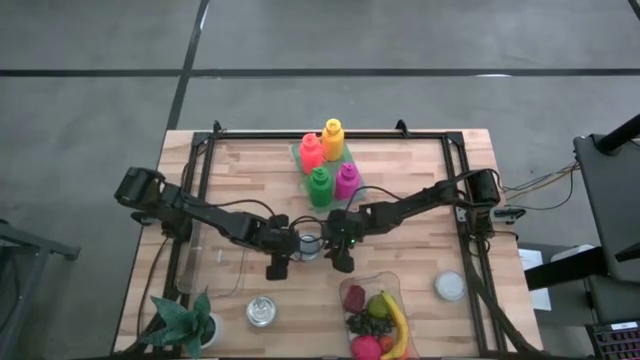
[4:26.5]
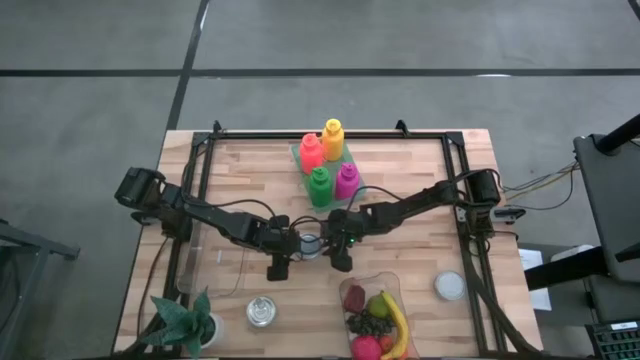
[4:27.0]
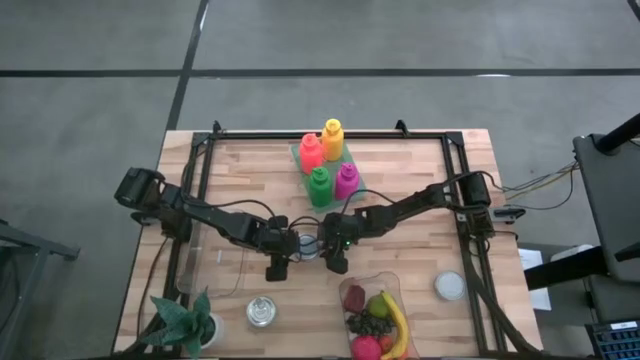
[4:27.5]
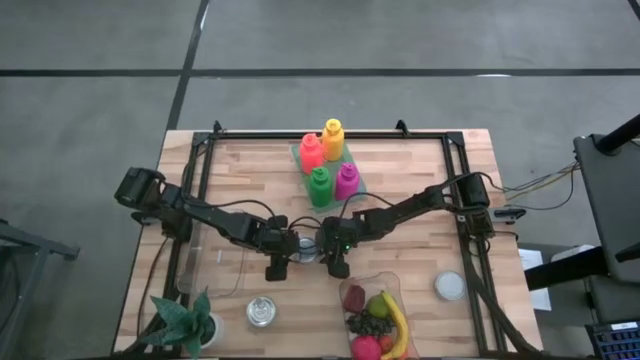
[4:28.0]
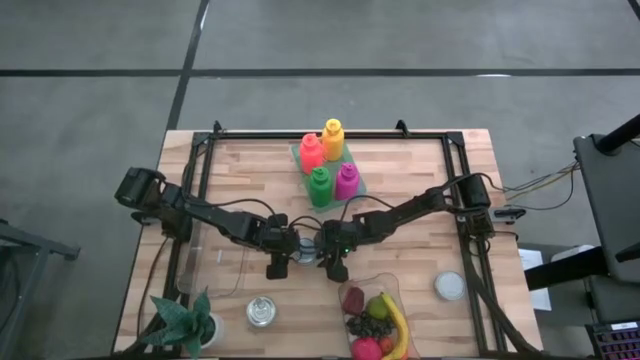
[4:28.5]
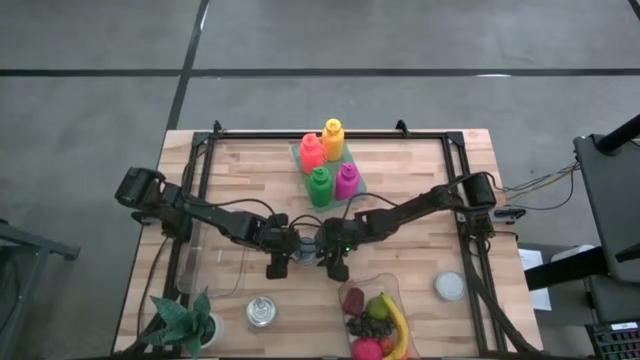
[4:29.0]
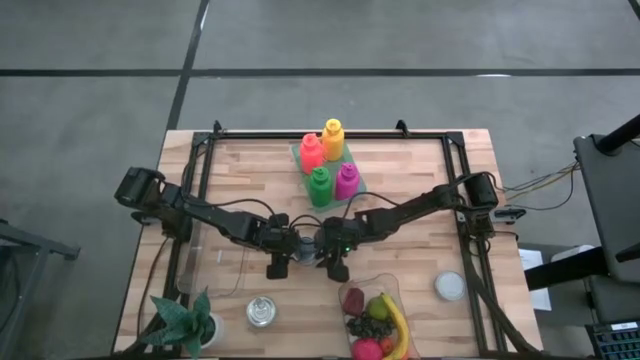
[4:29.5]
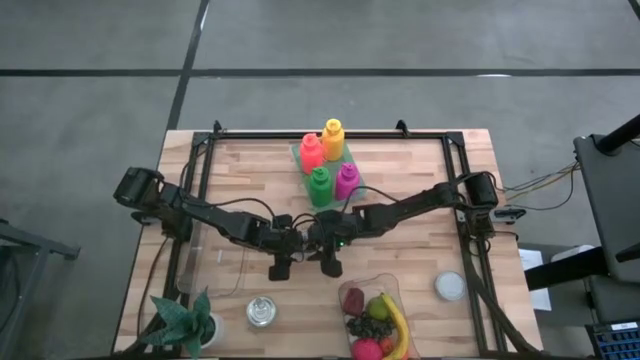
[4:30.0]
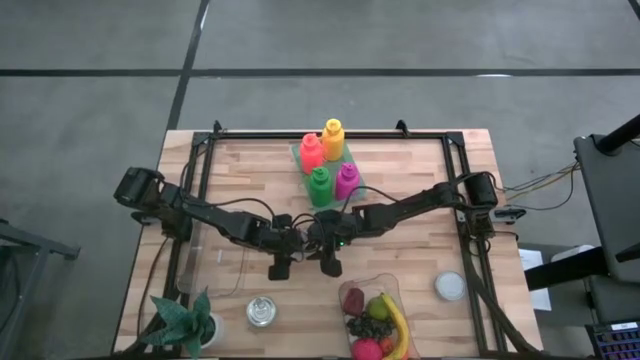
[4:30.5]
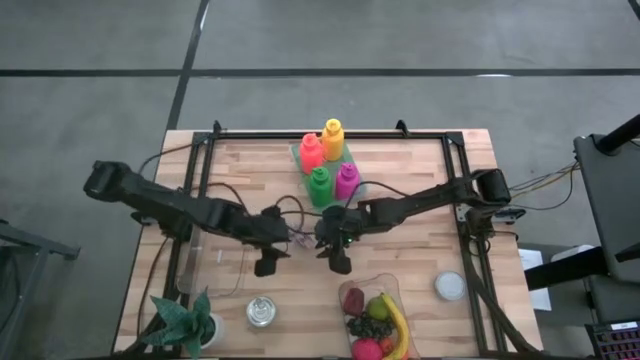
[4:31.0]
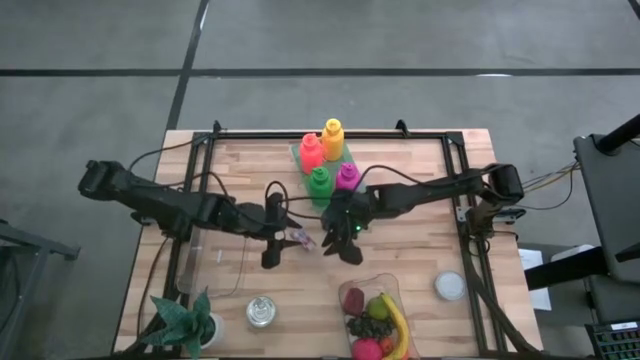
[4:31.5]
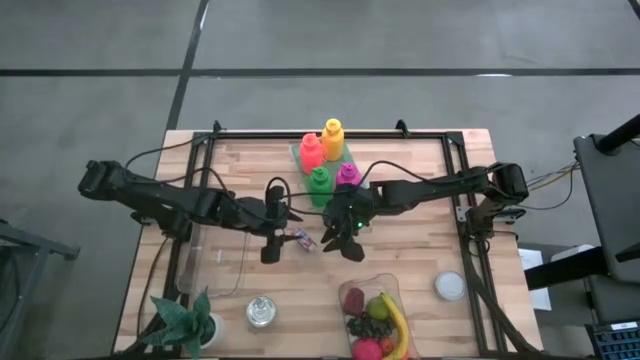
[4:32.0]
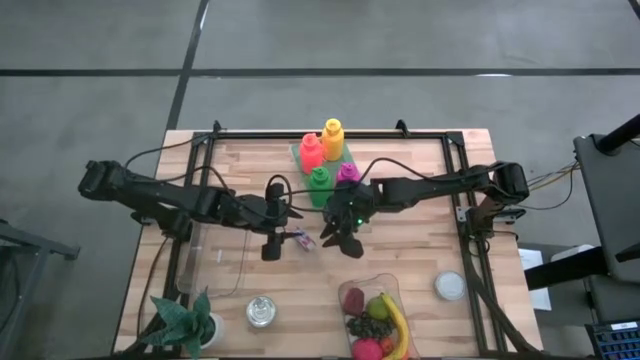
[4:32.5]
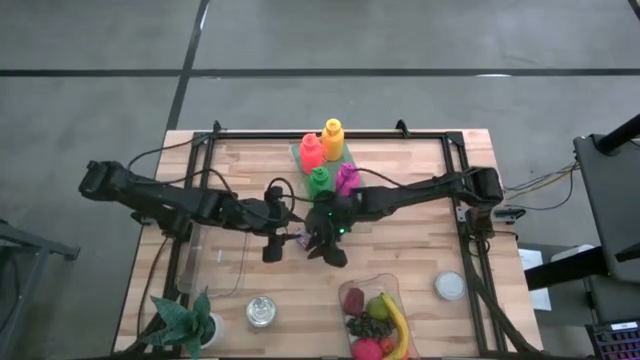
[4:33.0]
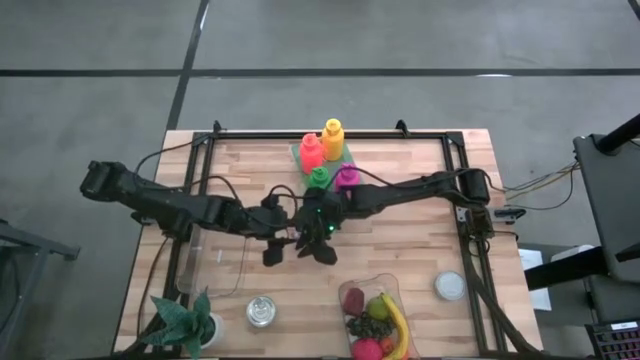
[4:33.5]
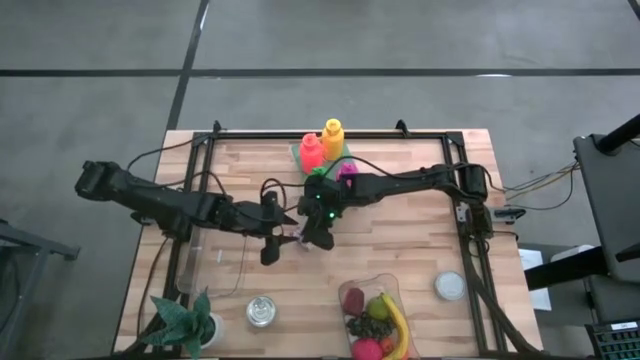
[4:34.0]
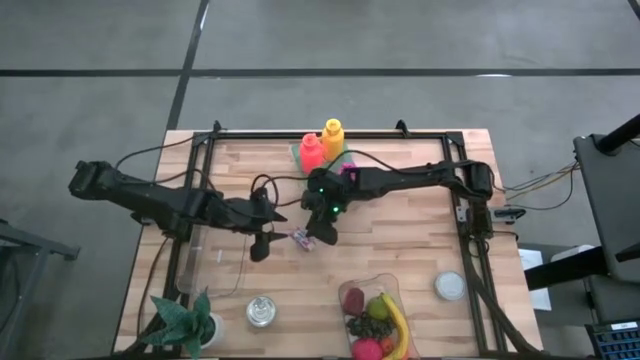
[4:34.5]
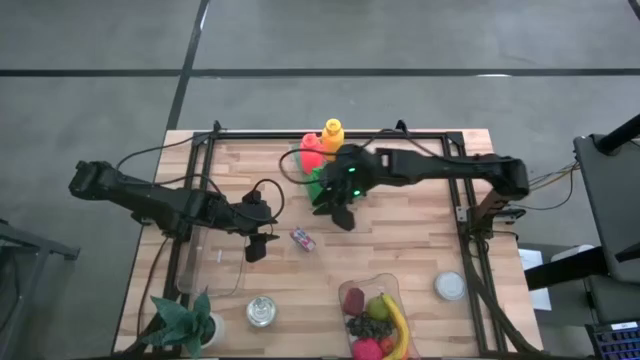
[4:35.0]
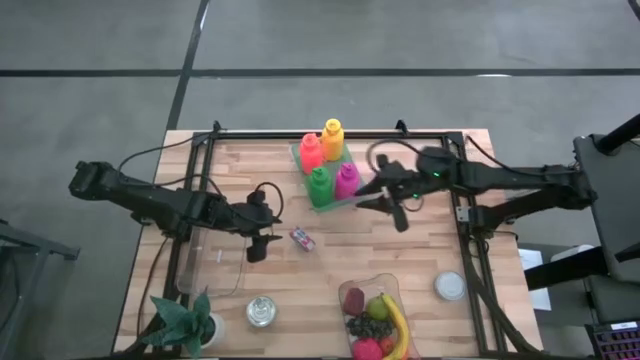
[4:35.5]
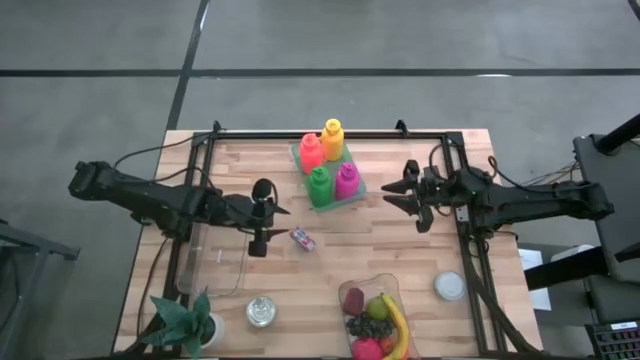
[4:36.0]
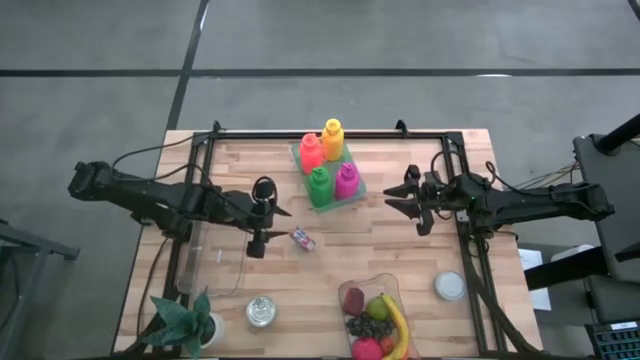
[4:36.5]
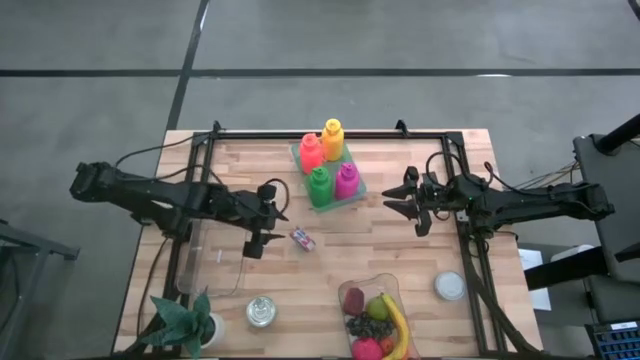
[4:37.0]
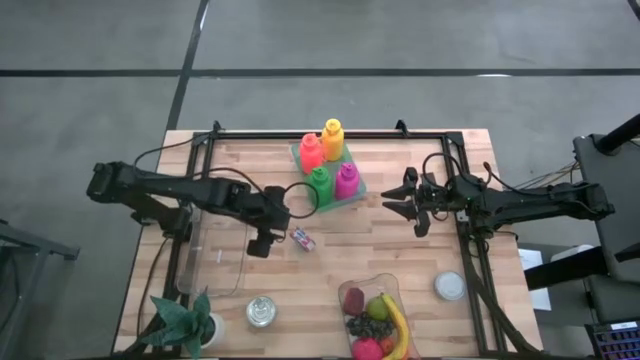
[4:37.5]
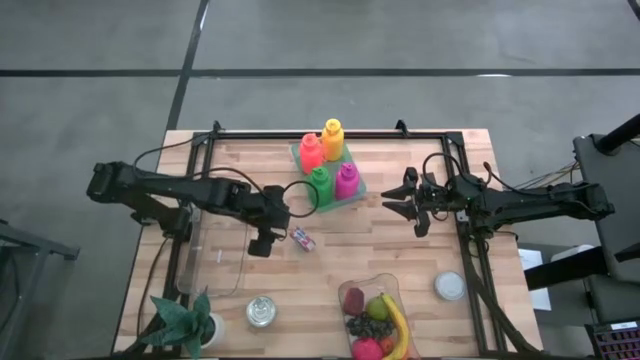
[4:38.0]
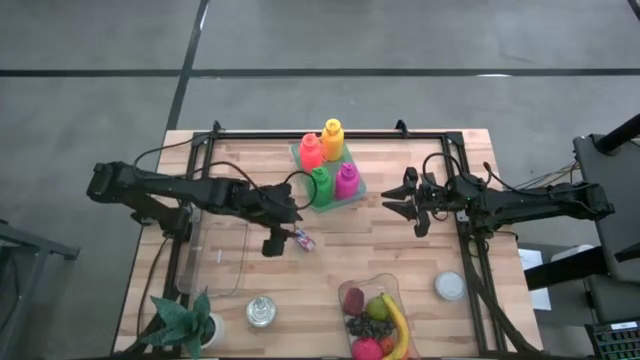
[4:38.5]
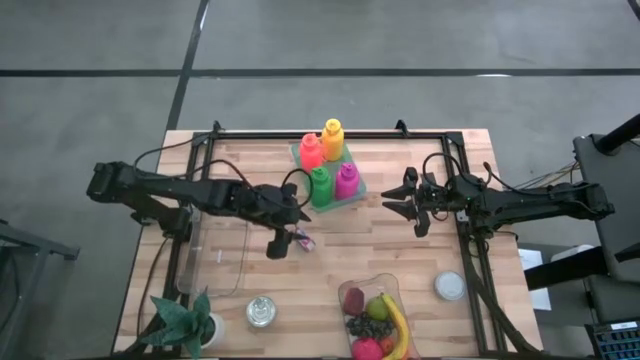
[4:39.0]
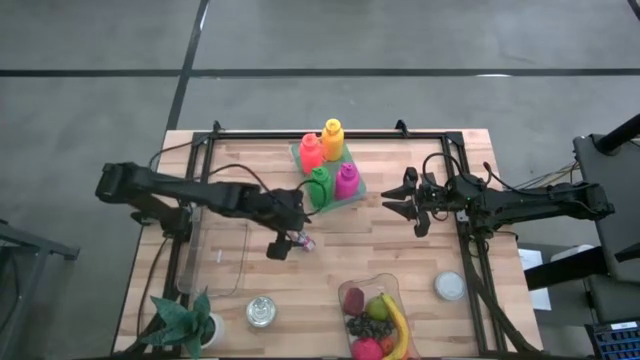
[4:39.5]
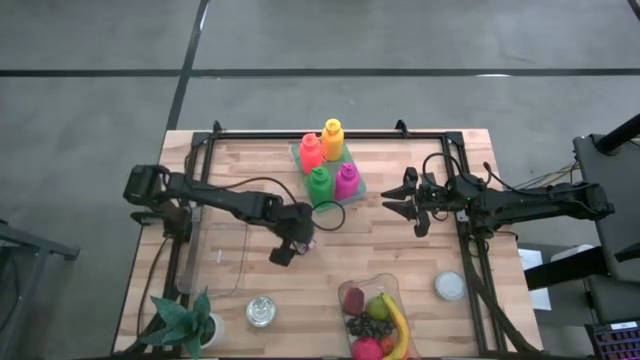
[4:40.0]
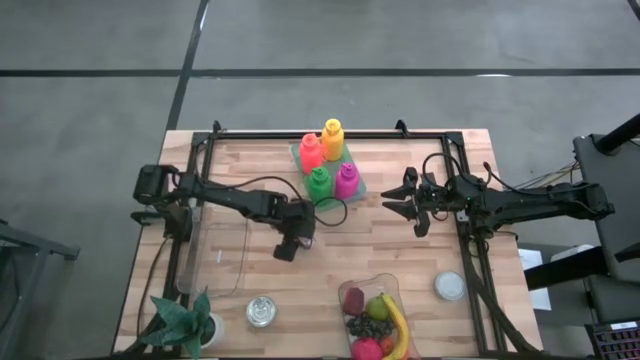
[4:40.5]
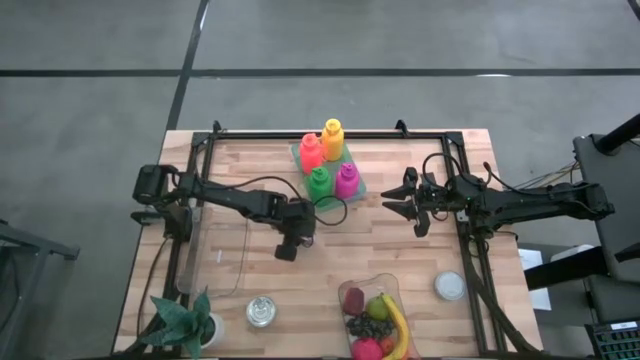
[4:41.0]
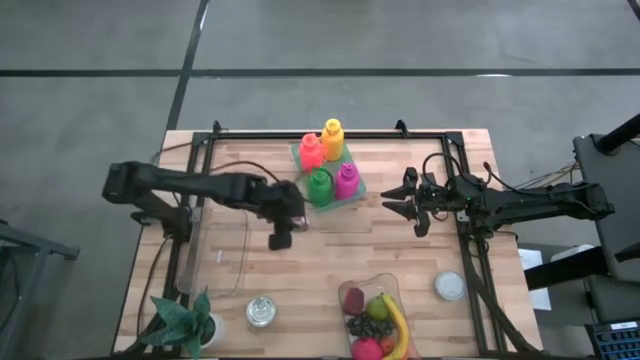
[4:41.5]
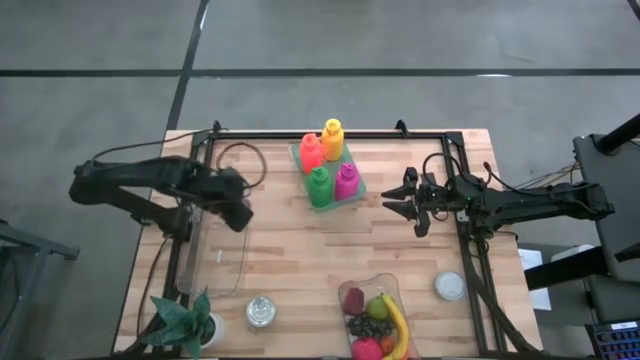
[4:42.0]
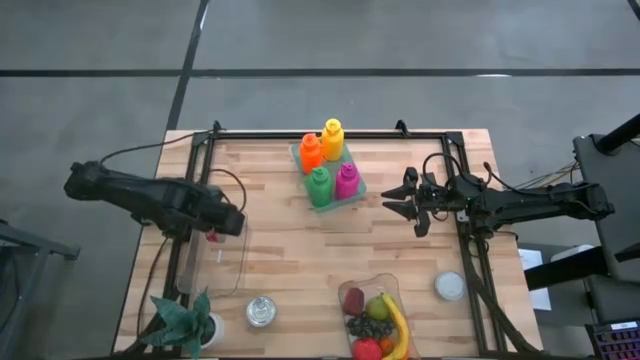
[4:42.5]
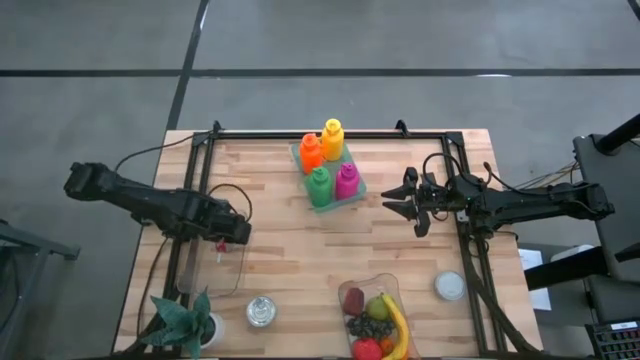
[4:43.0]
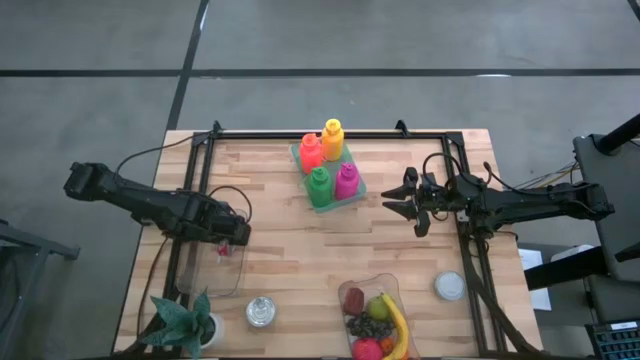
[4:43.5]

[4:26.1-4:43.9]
Task: Pick & Place Food Item
Put the red tuna can into the top transparent bin

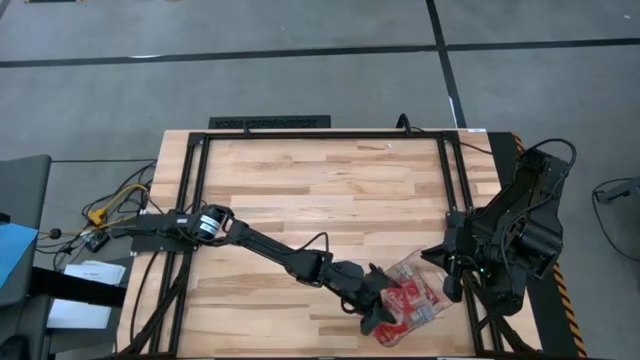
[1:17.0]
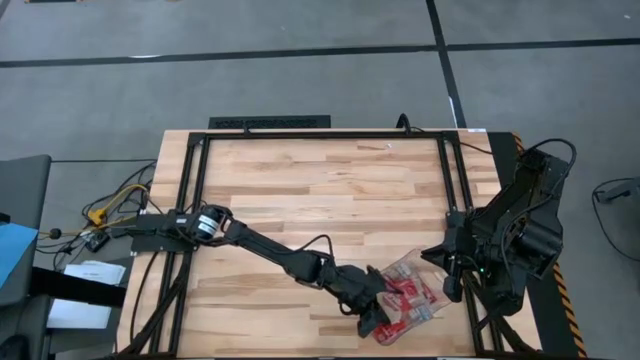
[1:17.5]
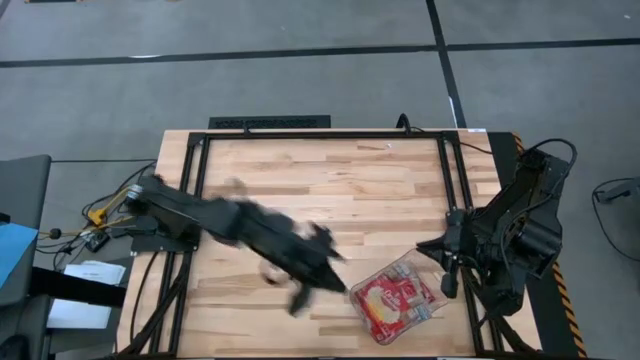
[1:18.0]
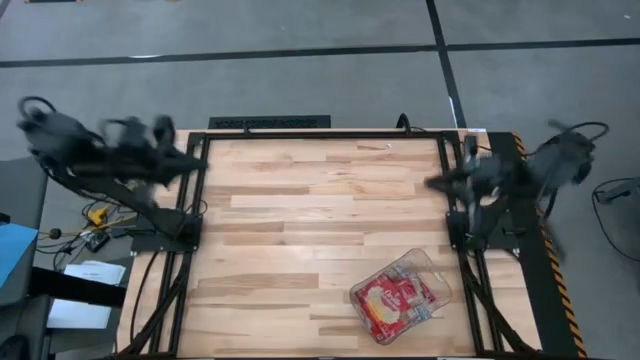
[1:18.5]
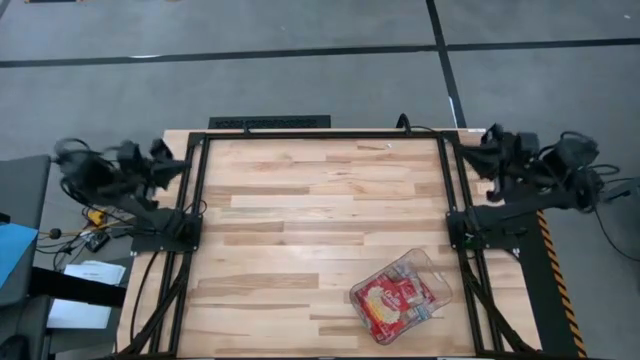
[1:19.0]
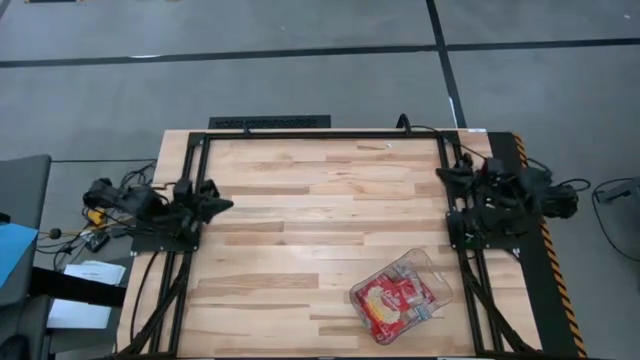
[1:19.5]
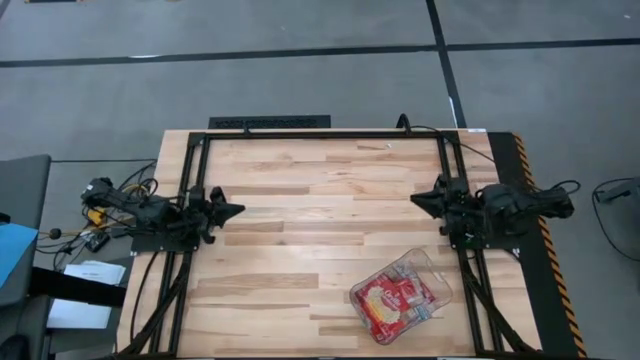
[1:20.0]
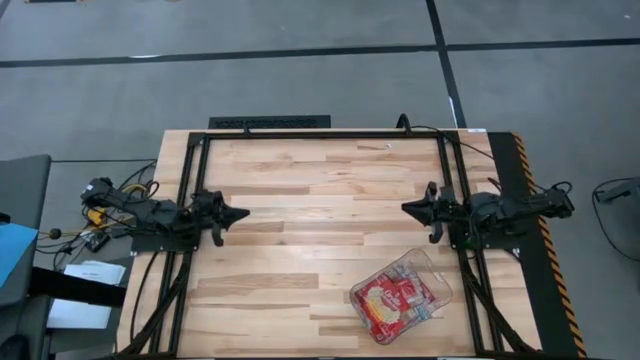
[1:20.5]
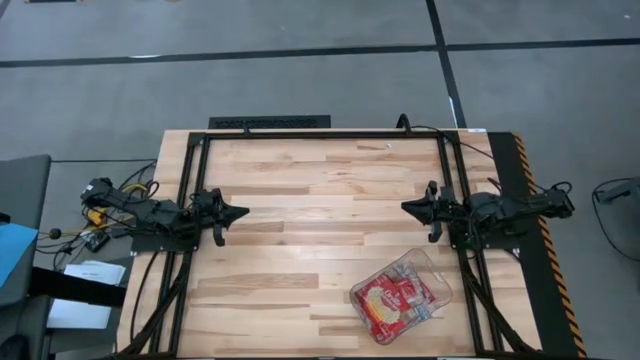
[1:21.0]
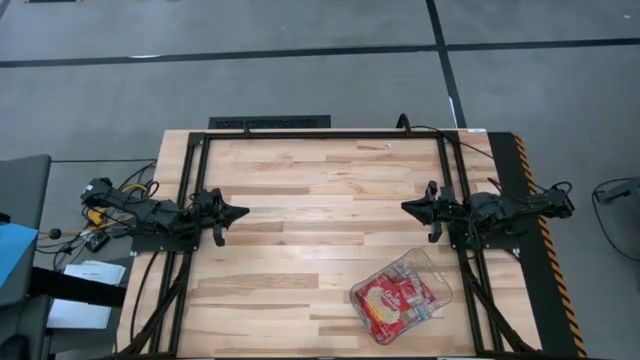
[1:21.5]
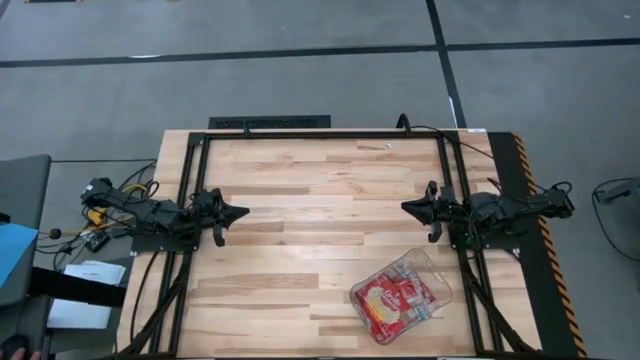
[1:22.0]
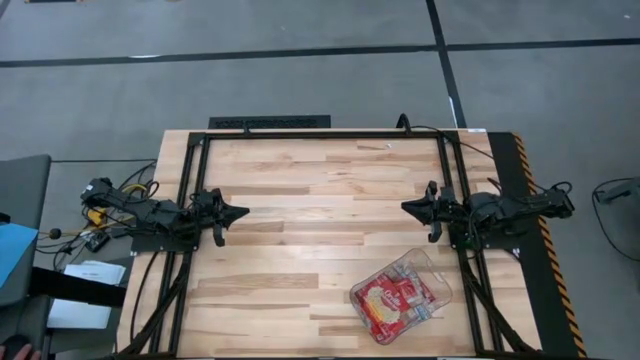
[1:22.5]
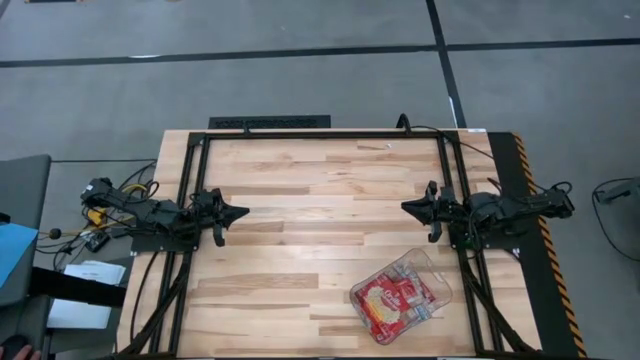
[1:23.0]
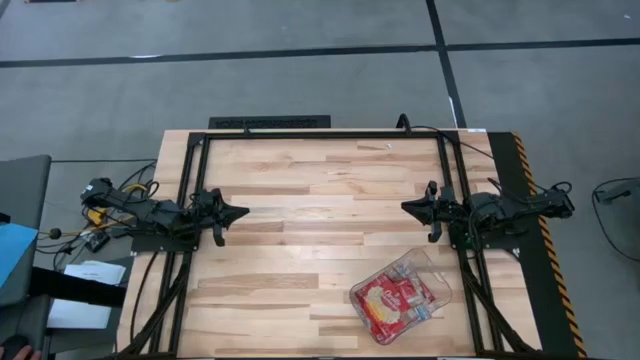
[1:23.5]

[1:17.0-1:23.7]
Task: Sort popcorn bags into baskets
Return to Home Position
